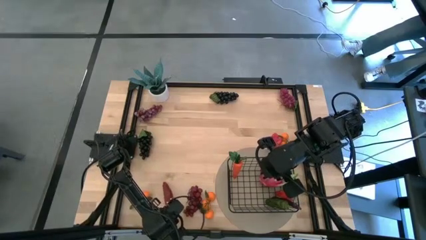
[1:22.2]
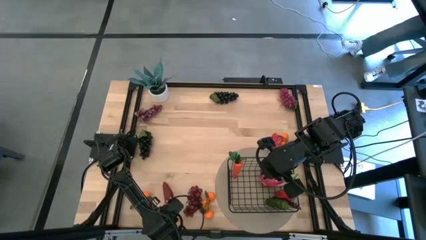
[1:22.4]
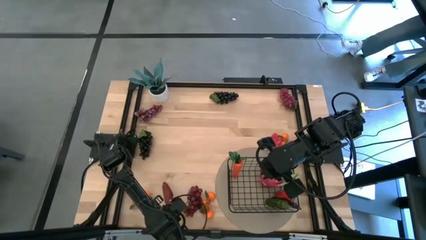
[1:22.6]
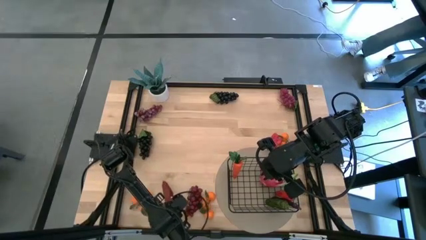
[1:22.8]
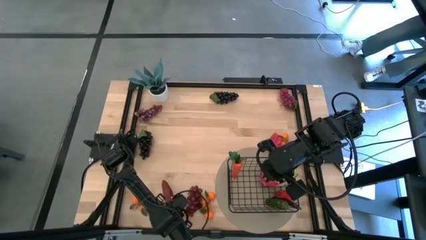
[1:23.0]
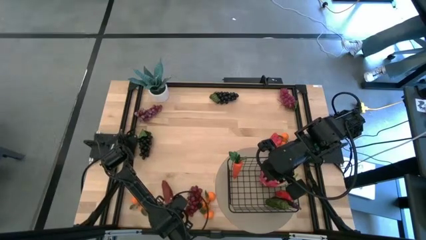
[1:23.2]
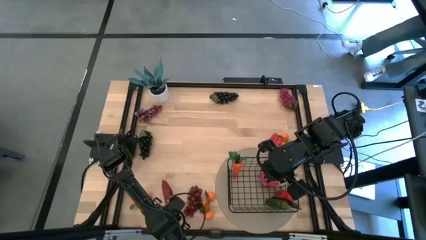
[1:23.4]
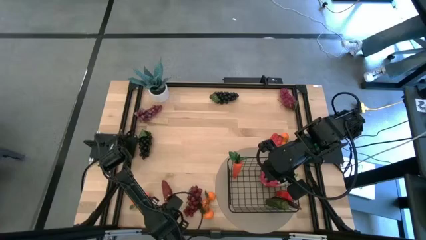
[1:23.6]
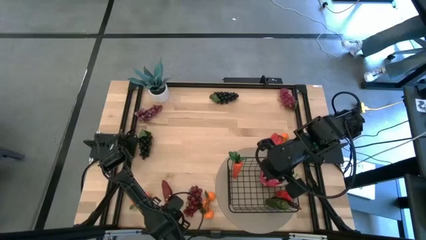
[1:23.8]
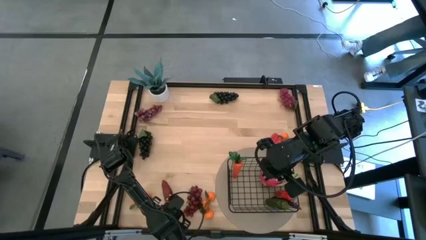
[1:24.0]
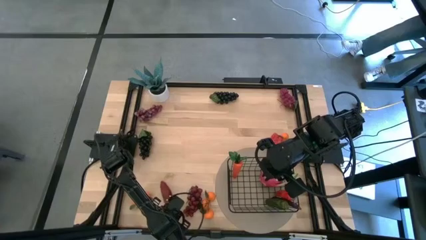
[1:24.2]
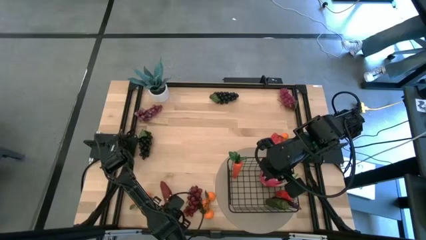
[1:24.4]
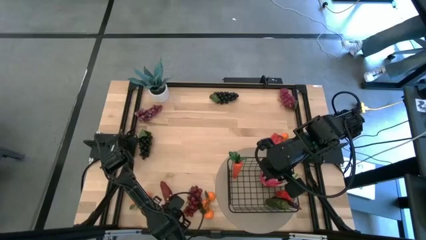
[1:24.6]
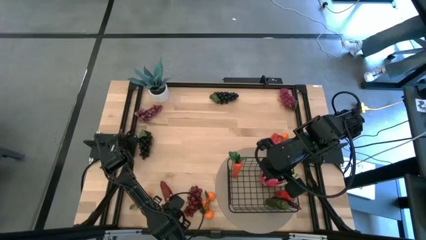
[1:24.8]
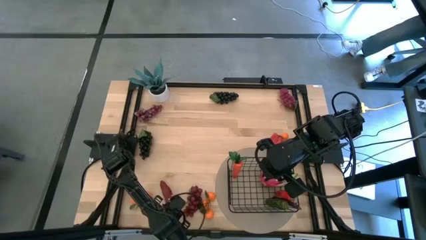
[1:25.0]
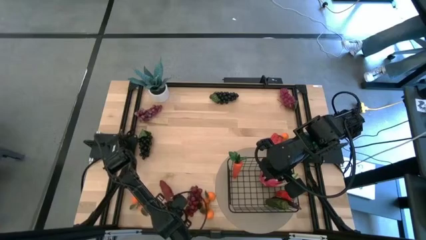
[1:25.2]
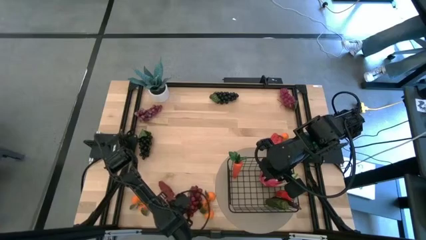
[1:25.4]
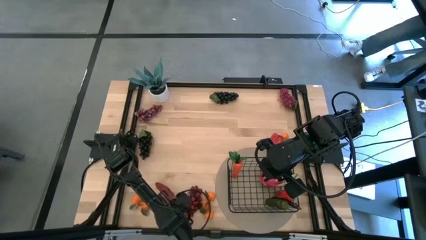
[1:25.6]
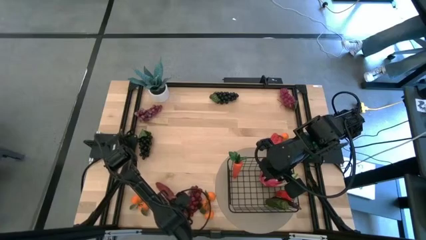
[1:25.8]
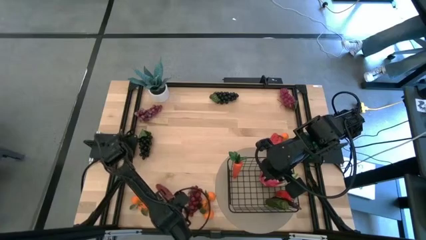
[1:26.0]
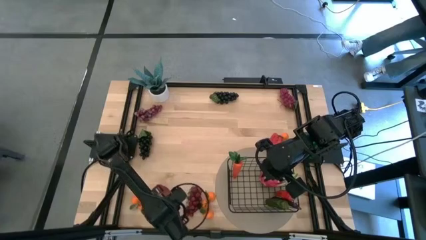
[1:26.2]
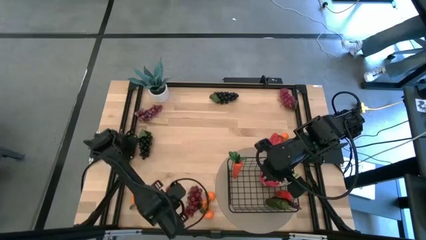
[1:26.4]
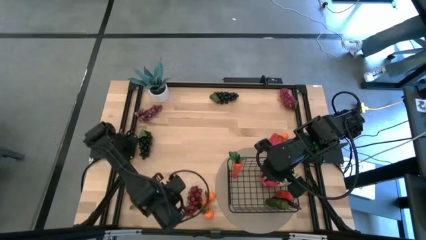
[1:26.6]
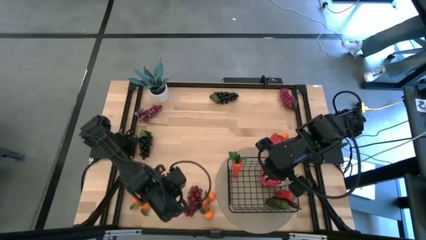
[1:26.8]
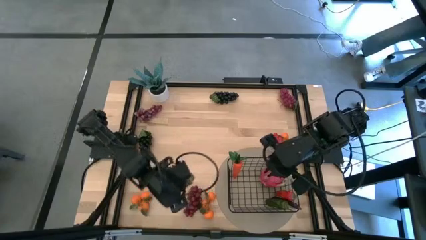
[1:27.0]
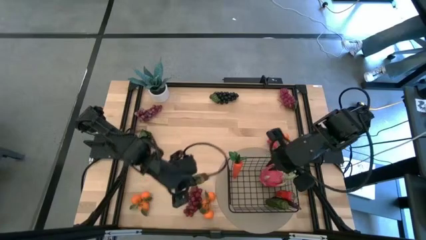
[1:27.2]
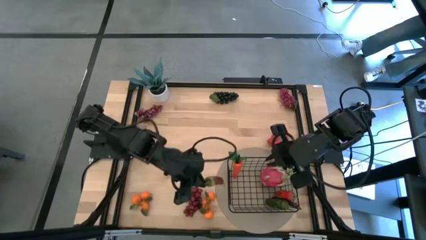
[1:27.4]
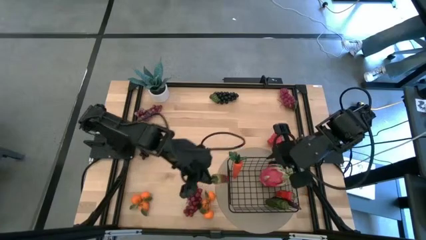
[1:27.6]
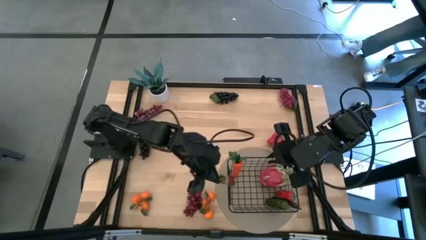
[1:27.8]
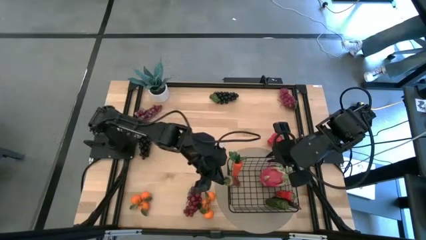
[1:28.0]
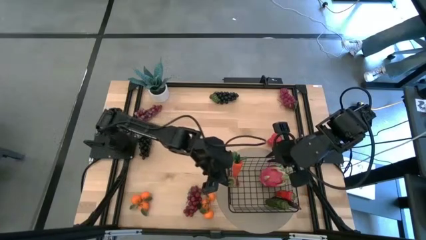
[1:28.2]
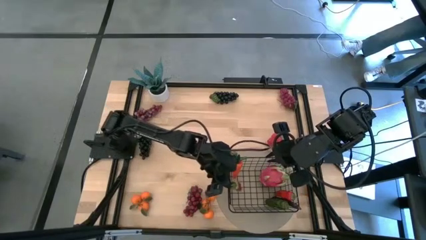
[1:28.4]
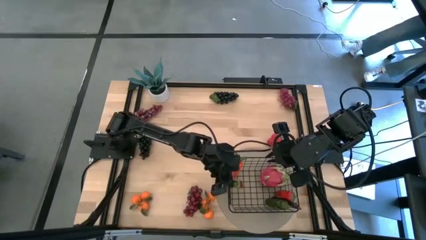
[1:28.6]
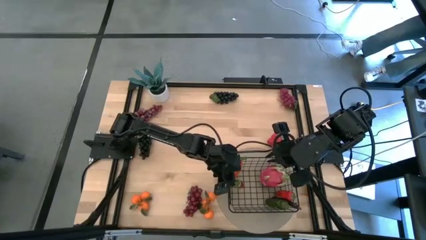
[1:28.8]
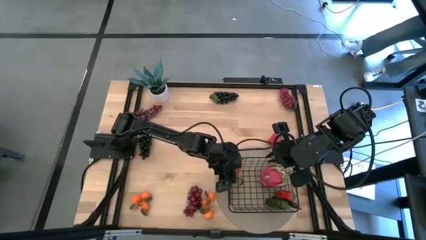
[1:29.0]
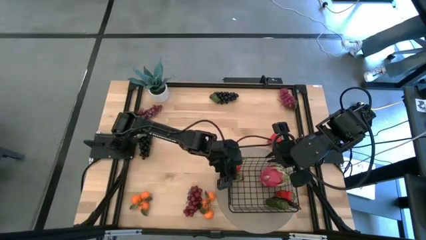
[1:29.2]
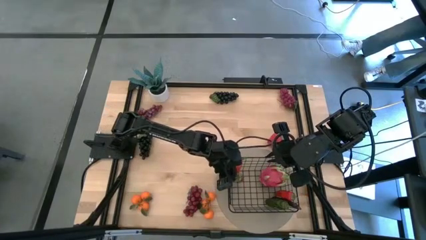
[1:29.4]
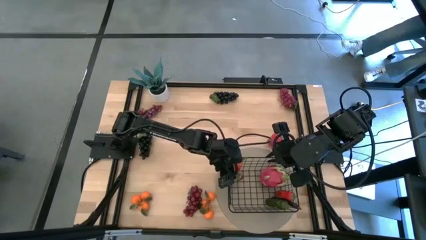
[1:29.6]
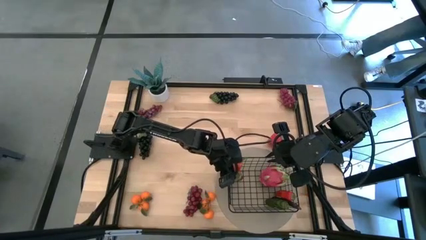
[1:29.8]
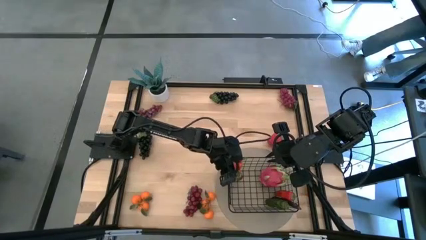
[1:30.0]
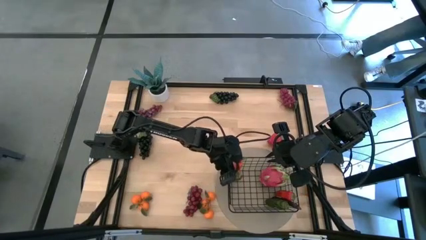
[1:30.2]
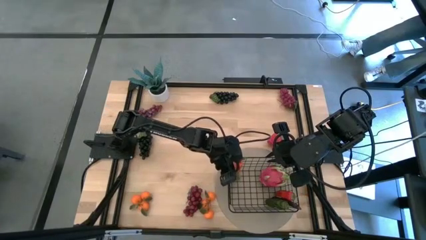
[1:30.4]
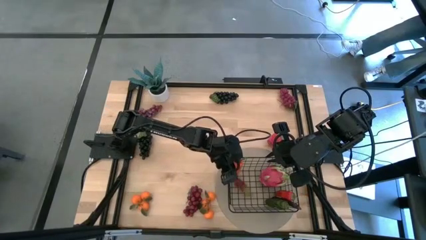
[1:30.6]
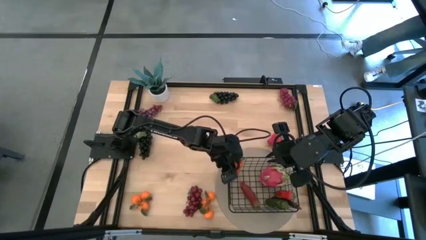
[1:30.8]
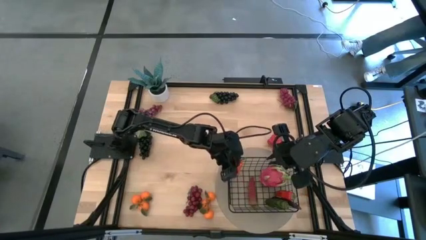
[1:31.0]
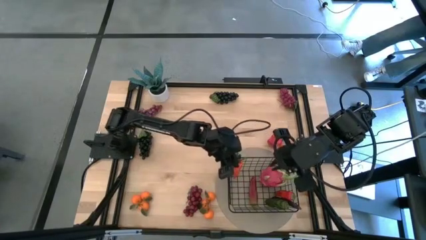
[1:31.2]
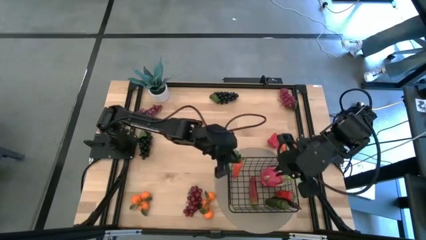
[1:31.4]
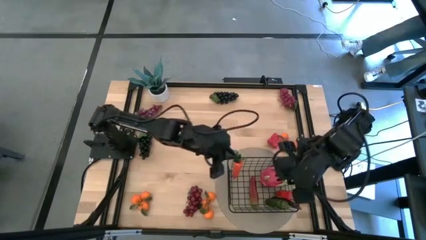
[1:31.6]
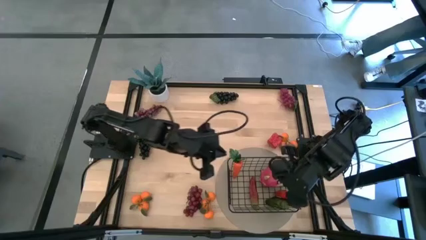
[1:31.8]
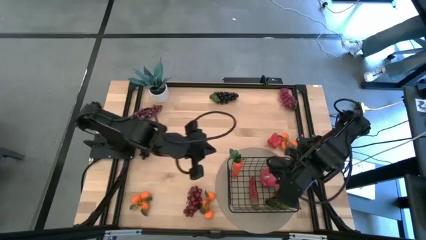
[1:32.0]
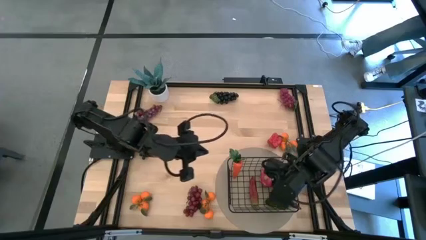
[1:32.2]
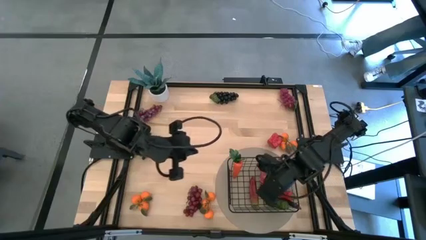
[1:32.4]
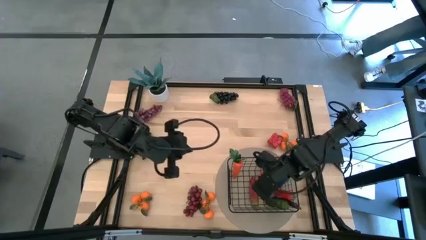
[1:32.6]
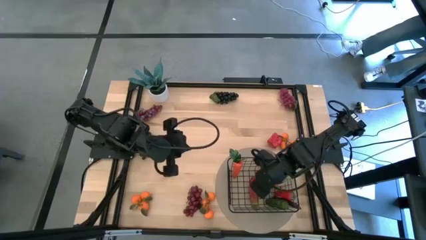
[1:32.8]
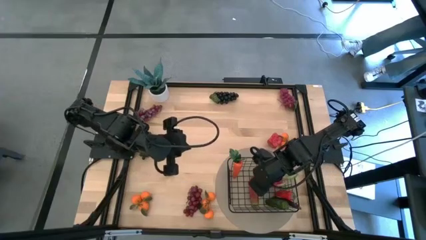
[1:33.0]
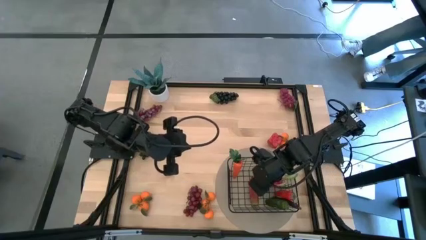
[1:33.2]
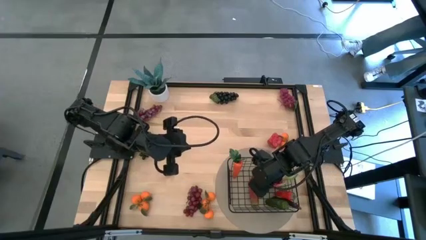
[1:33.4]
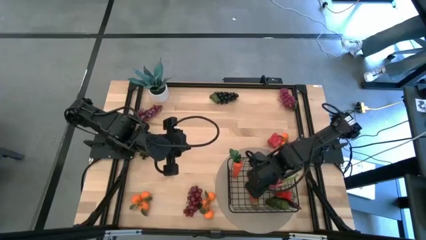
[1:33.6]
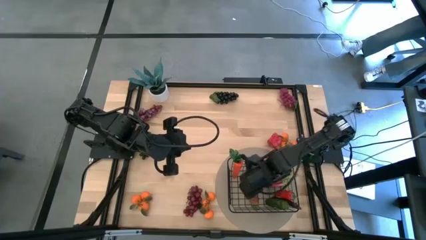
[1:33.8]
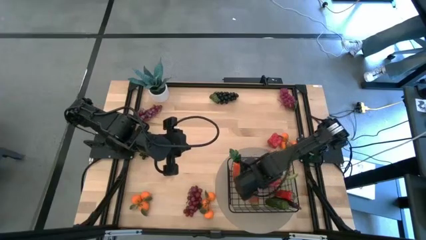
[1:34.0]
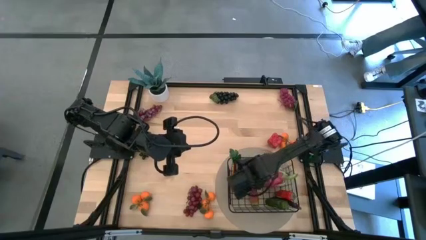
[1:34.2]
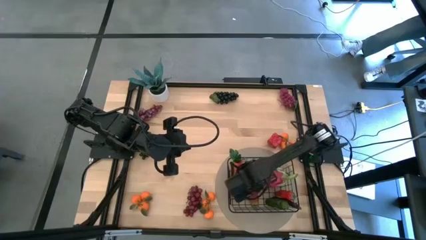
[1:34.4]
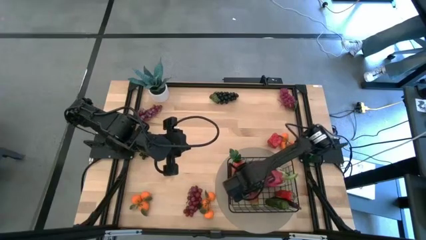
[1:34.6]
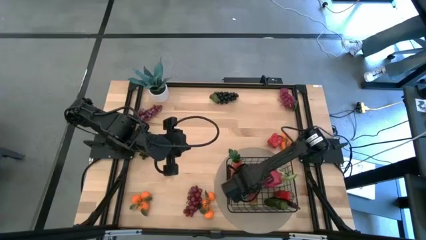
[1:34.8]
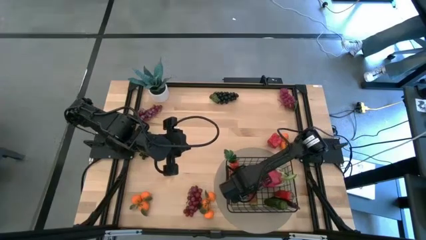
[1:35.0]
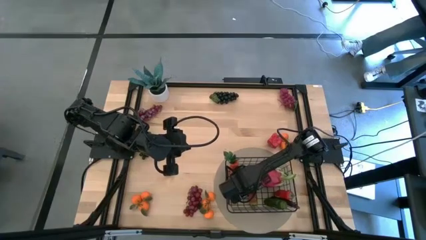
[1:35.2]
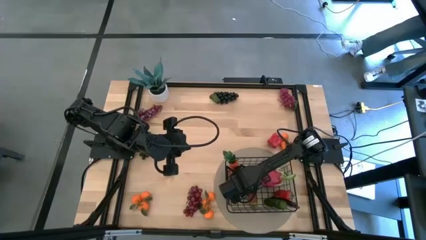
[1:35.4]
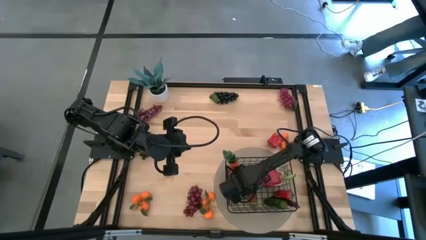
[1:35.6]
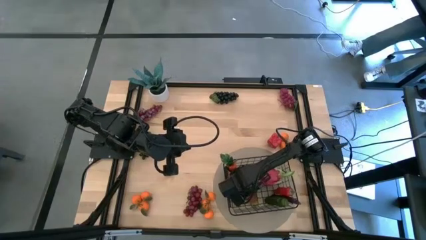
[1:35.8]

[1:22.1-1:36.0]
Task: Build produce basket
Put the bottom left pepper into the wire basket

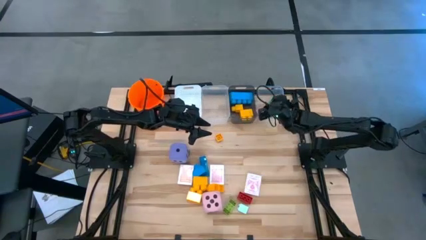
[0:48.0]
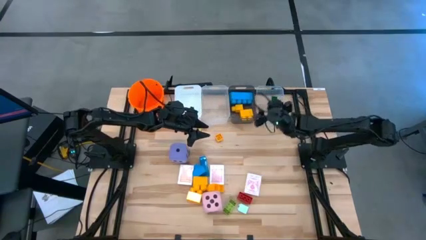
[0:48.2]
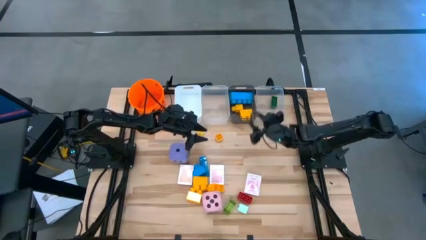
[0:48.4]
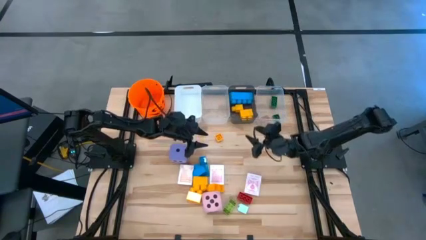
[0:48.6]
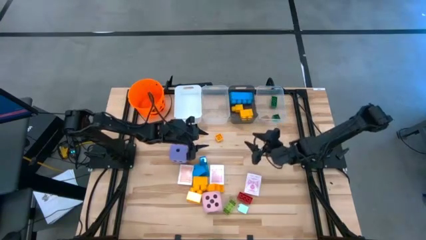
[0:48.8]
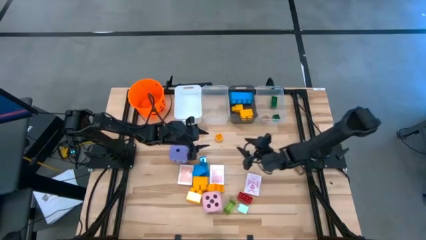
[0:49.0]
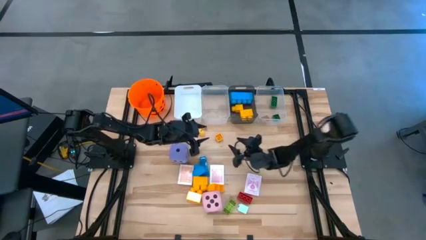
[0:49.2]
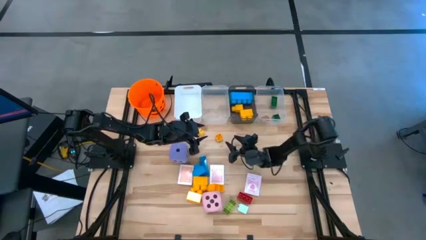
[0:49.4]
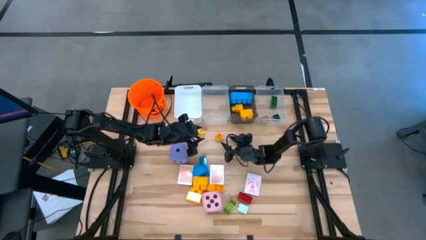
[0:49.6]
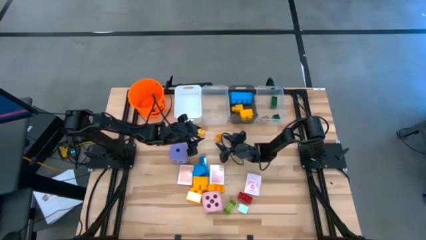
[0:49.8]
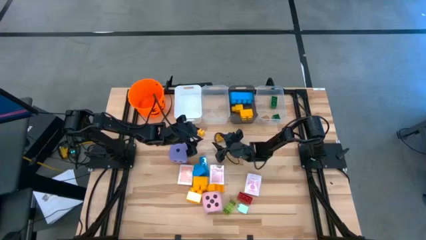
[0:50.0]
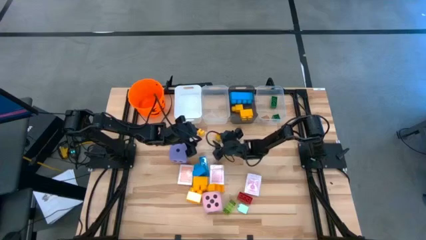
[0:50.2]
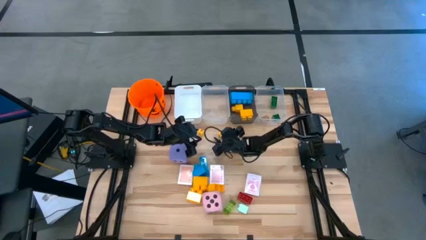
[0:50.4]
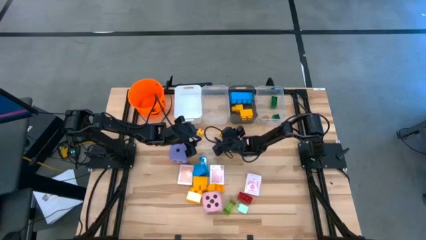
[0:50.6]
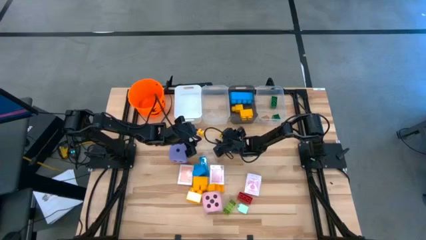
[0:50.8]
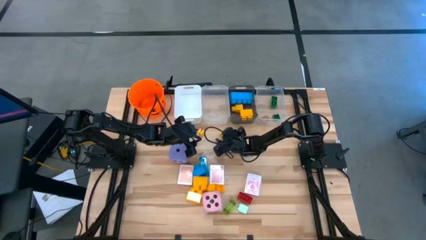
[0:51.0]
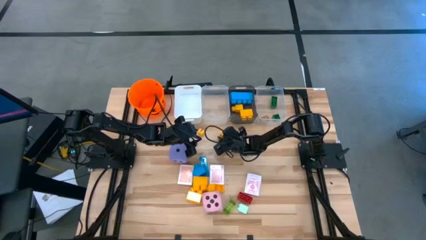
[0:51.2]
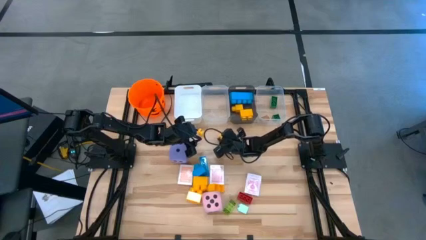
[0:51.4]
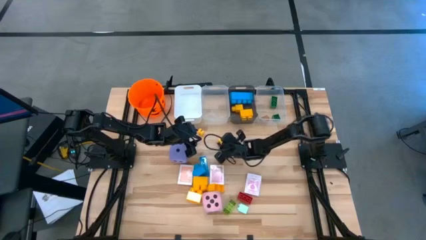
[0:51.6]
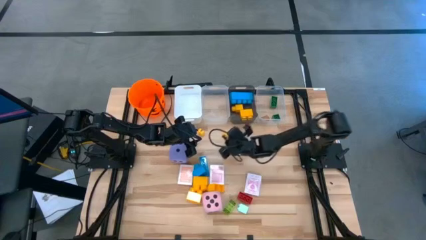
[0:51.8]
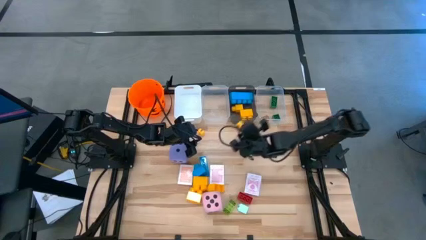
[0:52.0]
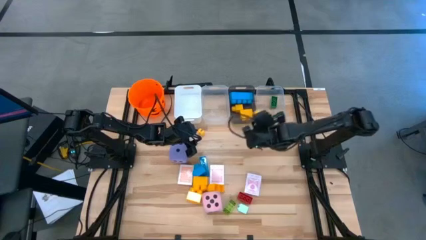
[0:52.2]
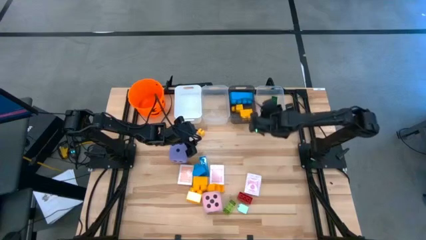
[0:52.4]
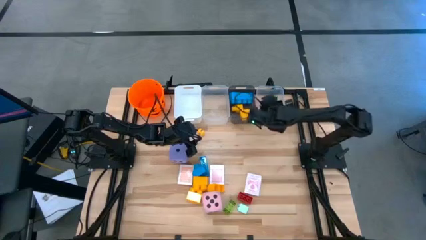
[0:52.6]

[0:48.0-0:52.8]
Task: Pick & Place Toys
Put the small yellow game piece into the right transparent bin
